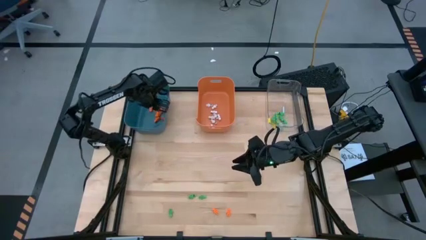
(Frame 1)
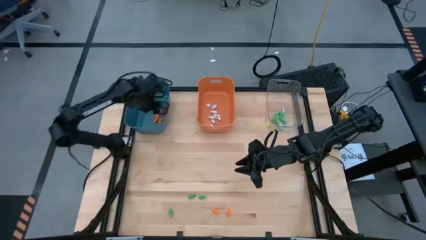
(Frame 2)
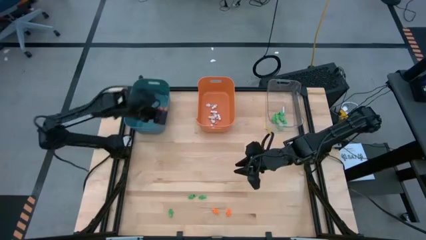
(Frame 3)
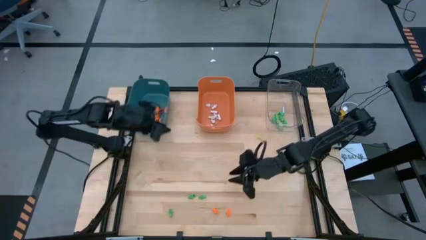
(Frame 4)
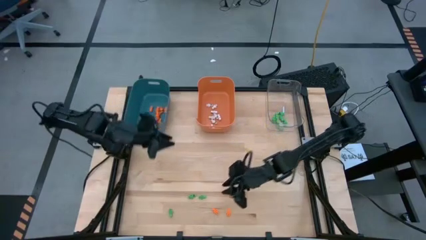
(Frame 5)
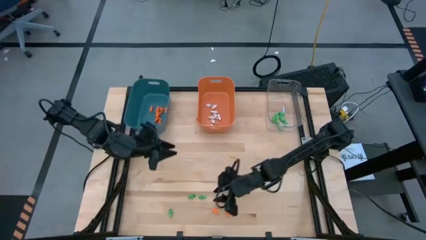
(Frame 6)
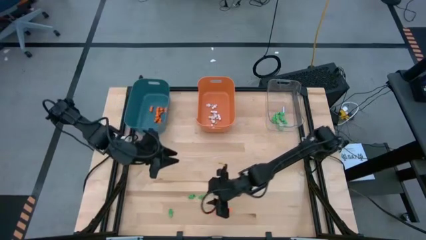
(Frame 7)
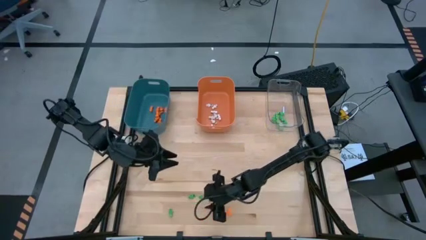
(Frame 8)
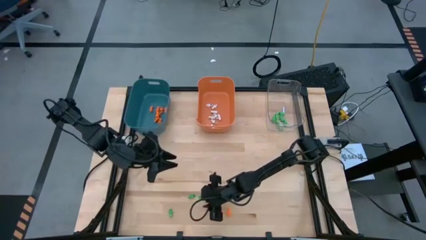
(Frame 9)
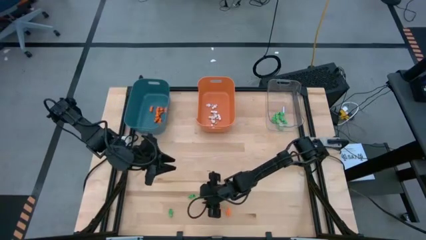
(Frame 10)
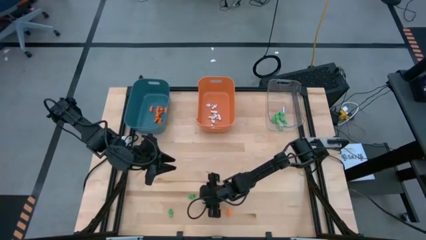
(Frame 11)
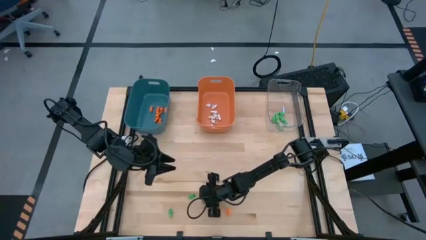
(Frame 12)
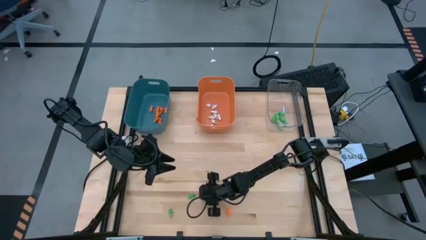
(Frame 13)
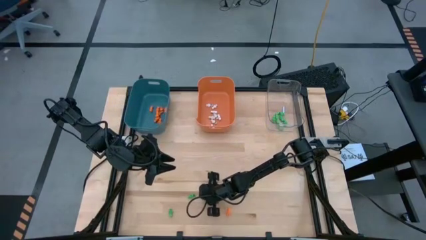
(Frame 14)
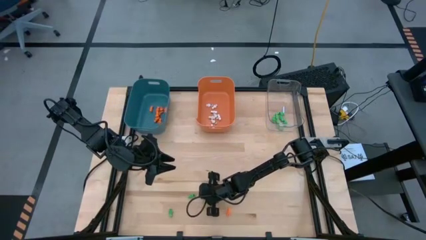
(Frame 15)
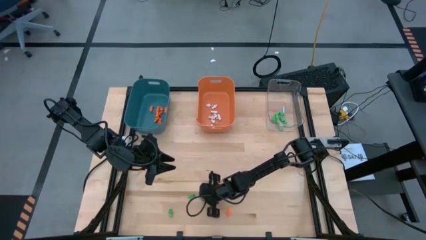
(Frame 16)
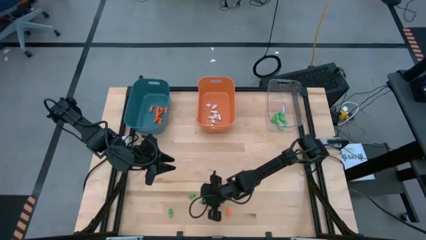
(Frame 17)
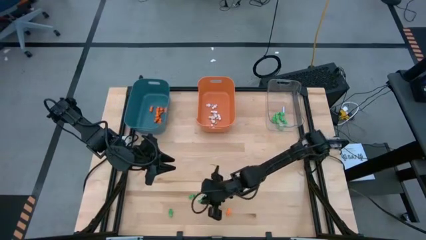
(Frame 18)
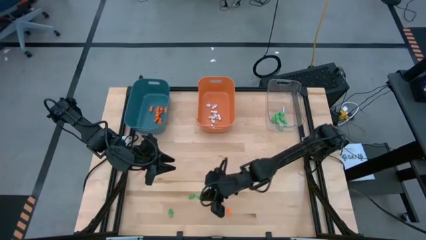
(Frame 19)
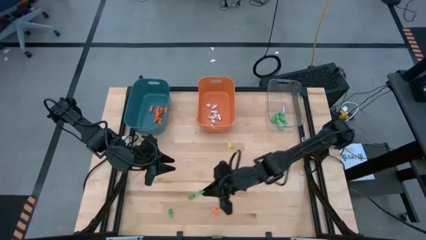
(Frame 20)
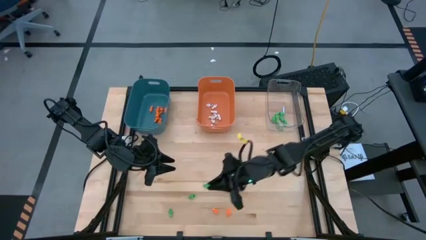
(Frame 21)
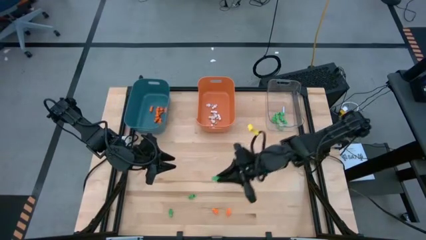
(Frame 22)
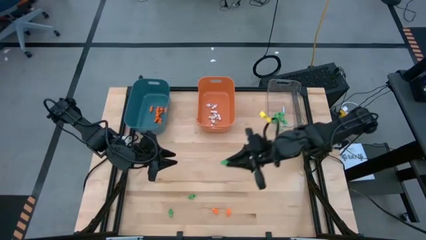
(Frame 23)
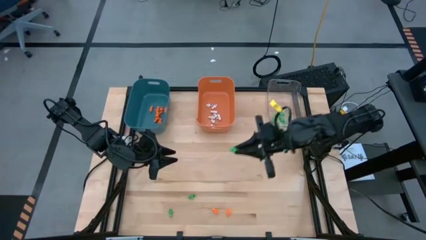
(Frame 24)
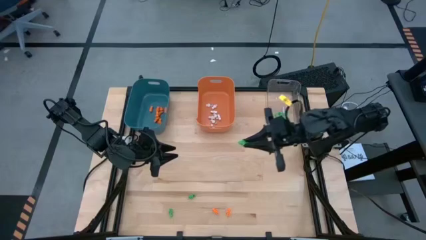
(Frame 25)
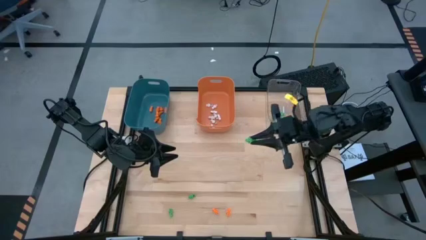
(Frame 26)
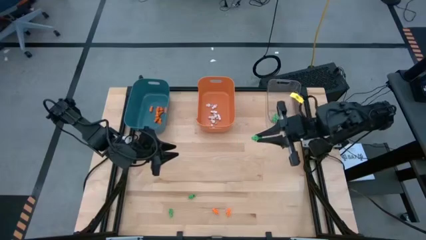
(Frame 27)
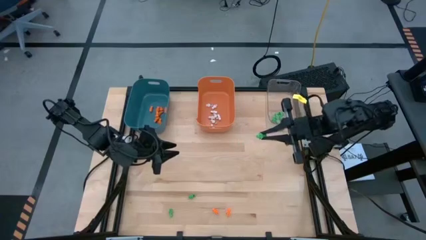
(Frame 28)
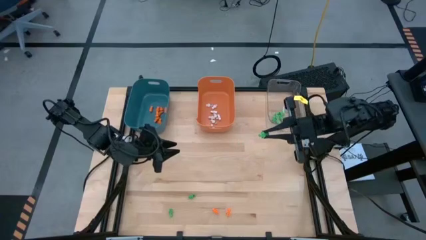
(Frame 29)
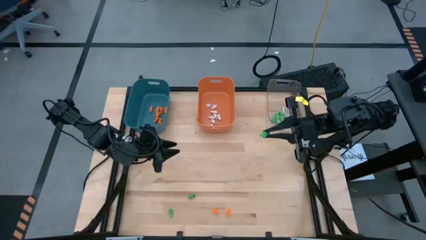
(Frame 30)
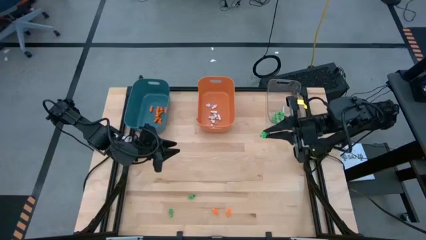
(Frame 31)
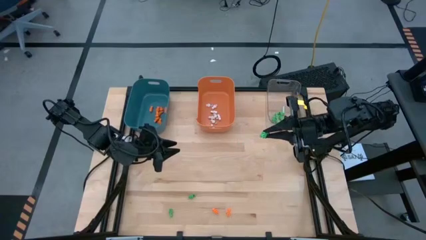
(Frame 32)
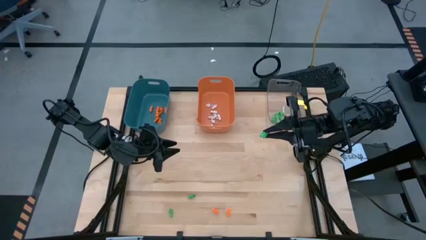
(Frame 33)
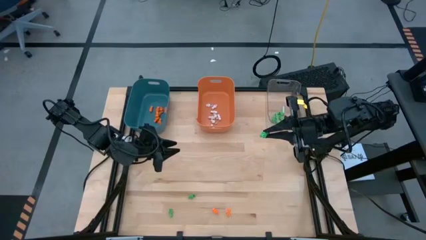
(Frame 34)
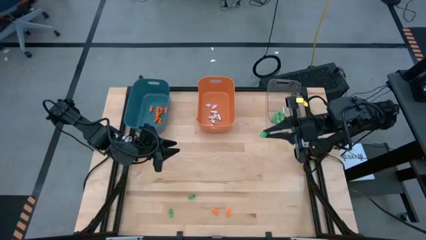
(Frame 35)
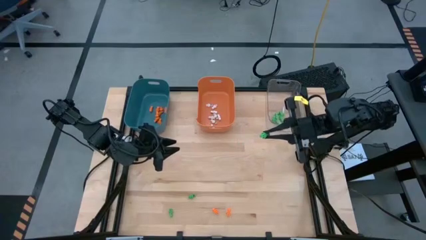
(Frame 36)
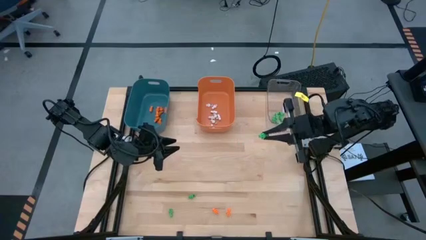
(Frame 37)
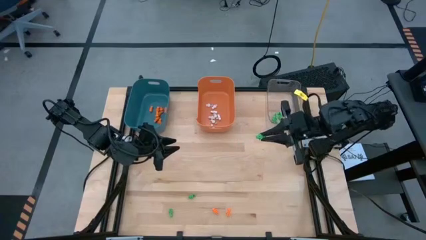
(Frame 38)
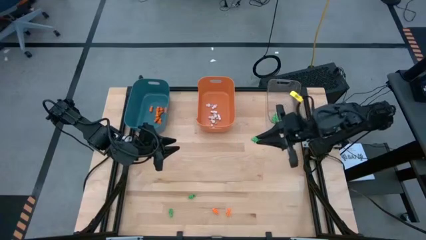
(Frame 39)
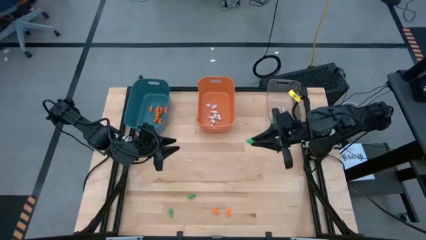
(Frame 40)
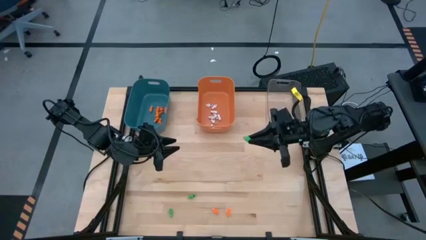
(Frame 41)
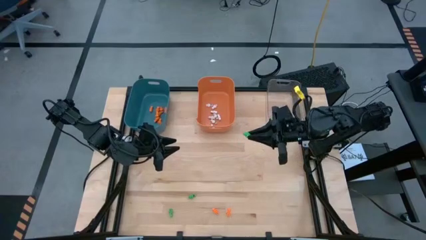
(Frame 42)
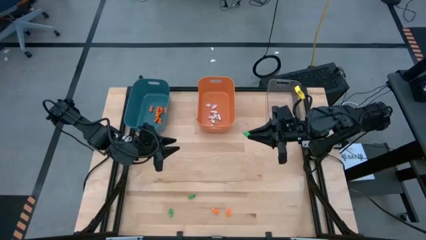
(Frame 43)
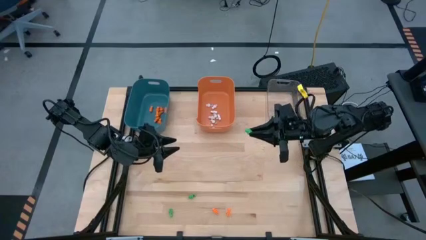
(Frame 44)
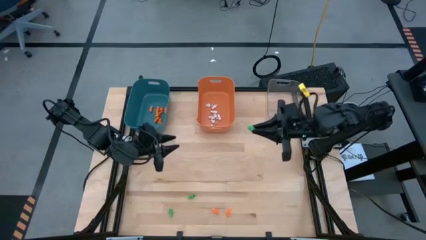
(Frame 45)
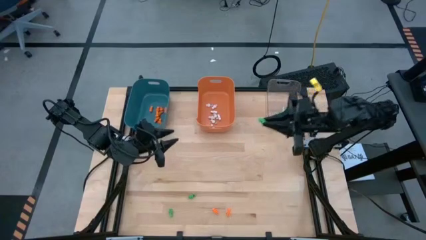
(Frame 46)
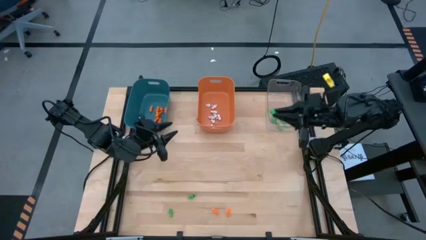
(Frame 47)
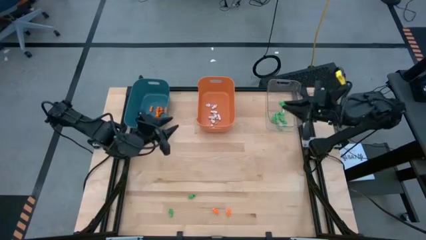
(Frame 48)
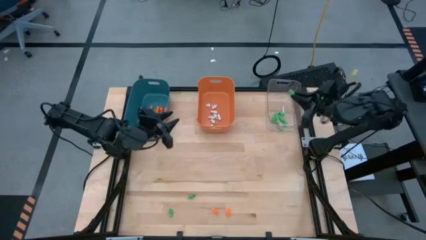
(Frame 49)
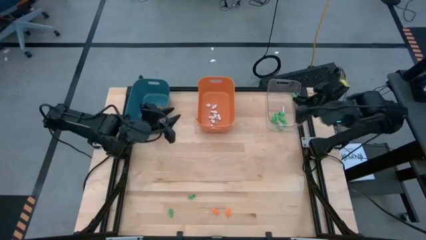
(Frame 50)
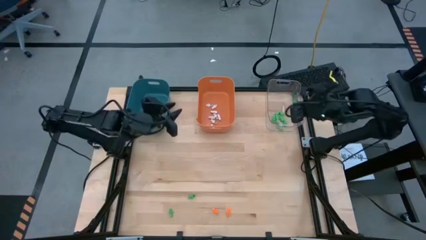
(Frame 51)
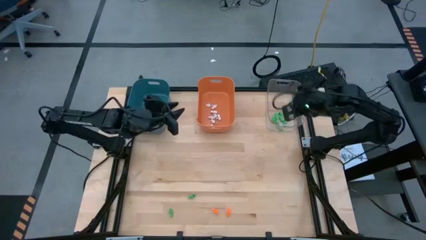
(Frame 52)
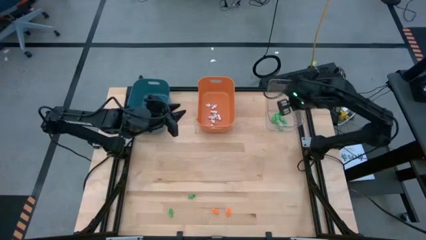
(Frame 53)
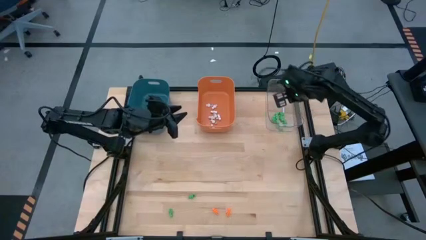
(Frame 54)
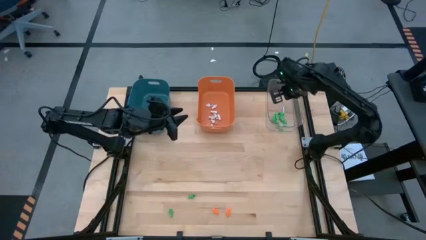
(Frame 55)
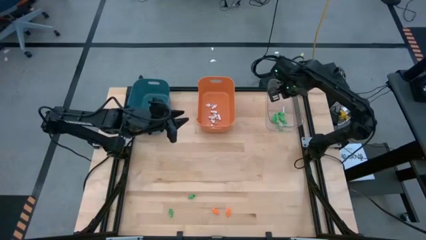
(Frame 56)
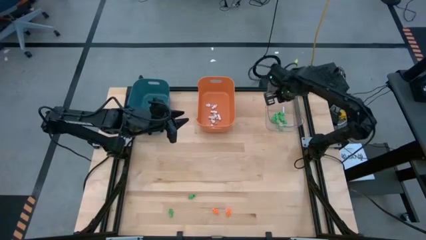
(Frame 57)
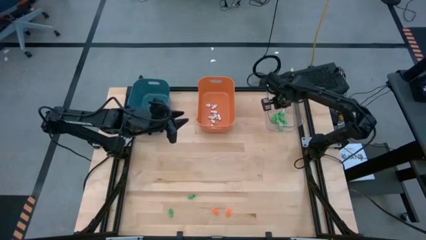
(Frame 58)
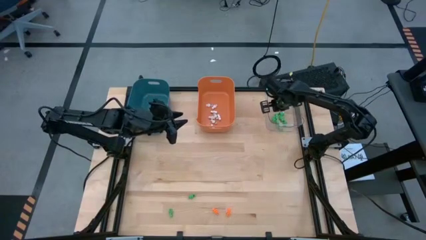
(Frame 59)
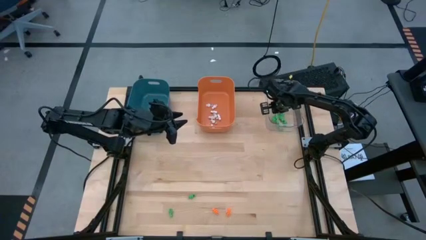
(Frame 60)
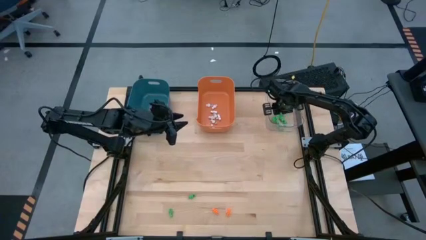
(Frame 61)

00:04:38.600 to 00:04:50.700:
Task: Sort Halloween decoration
Put the green skeleton toy into the transparent bin
